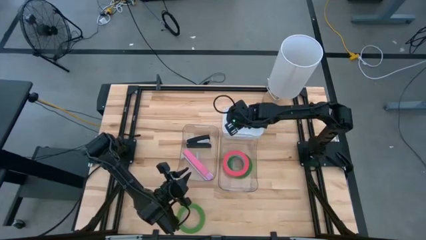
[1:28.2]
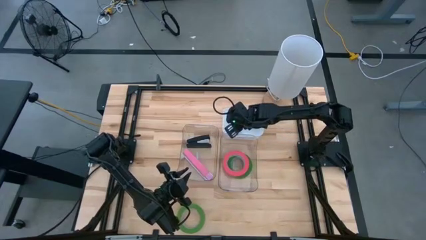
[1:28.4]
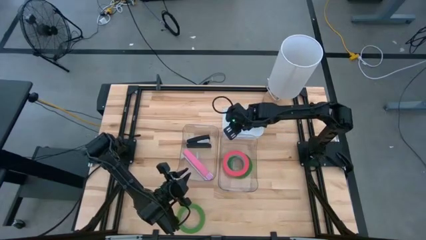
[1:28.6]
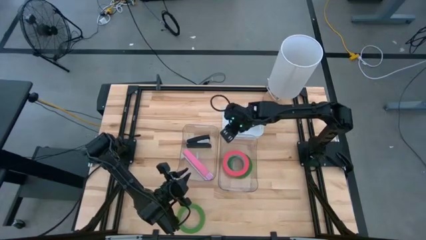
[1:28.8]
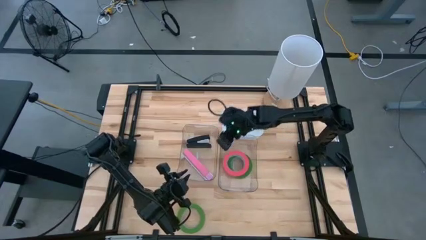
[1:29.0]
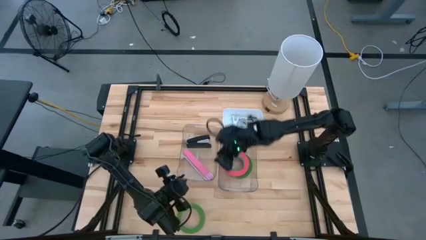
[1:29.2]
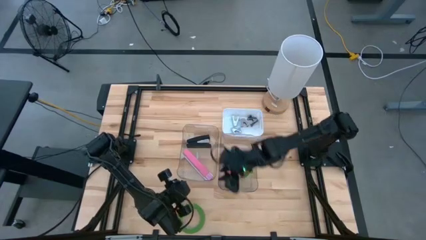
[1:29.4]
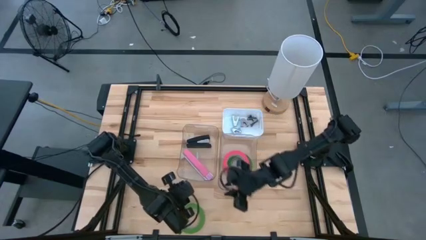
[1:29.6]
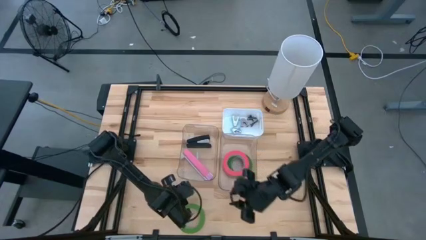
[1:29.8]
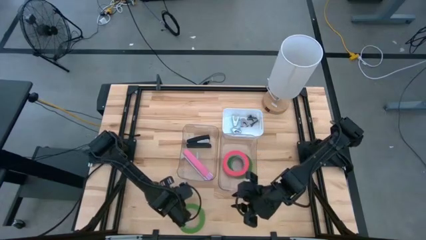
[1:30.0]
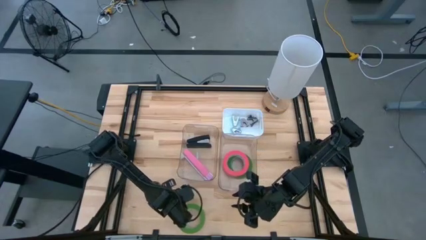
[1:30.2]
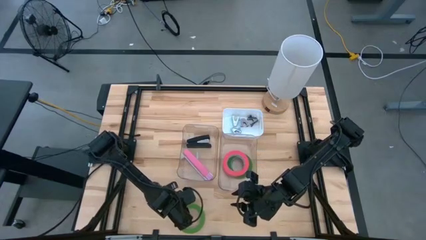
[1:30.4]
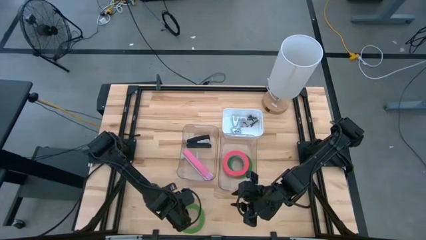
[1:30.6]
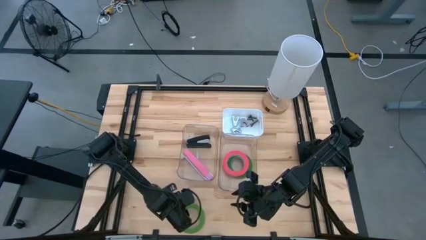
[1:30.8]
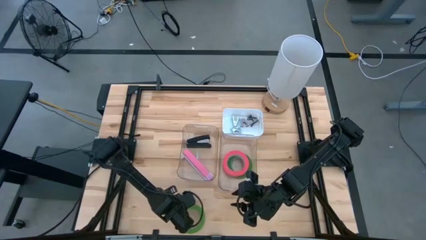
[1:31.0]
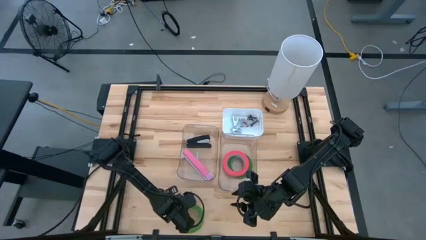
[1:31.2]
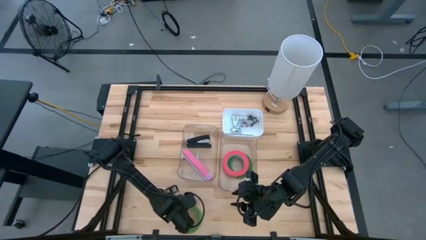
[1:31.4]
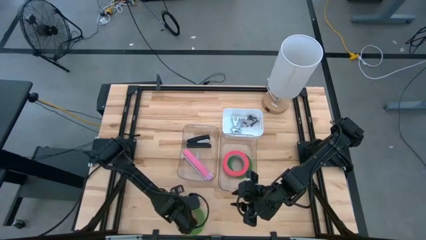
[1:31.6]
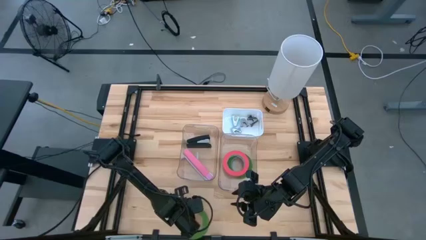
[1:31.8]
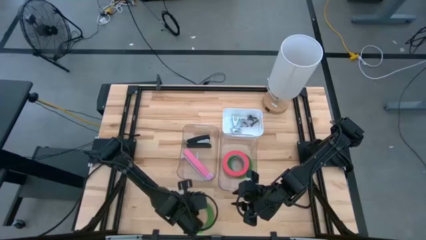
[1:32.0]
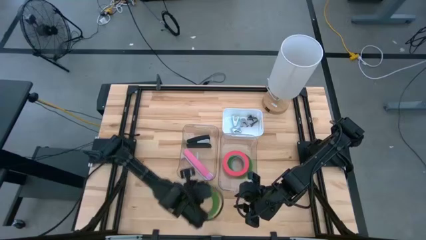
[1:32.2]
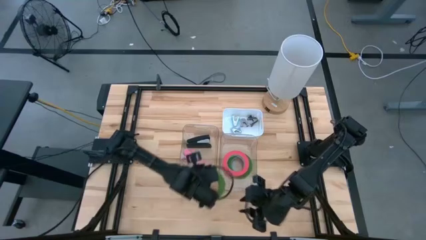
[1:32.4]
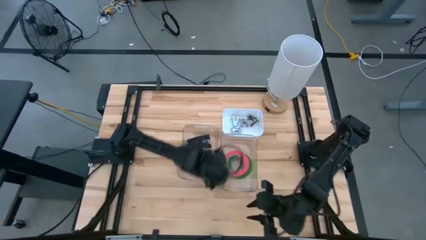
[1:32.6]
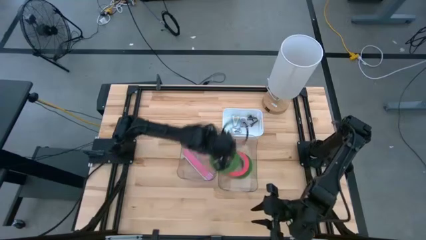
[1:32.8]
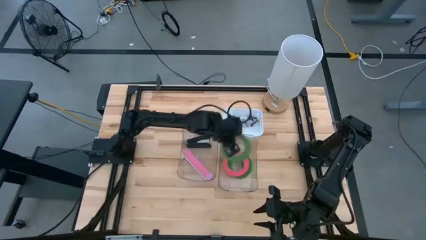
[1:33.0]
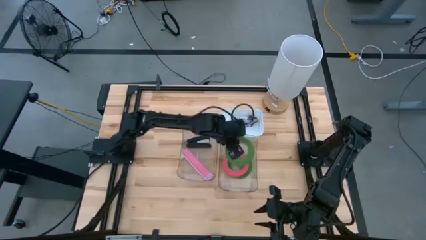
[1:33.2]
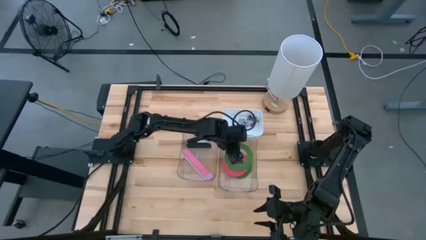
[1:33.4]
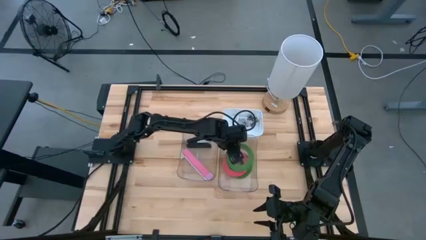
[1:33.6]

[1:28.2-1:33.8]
Task: Pick and place Stapler, Stapler remover, tape
Put the green tape into the right transparent bin

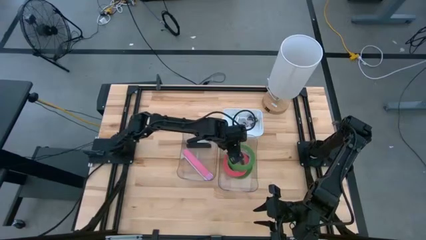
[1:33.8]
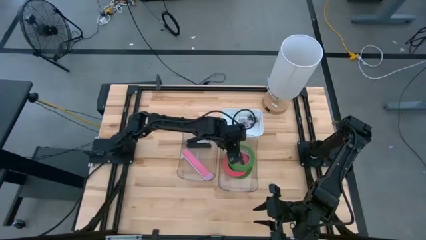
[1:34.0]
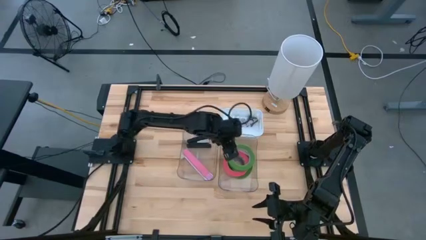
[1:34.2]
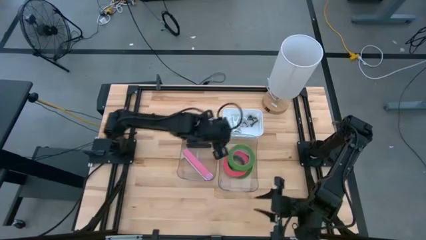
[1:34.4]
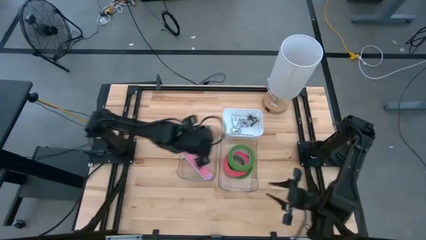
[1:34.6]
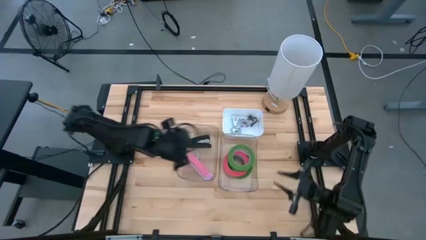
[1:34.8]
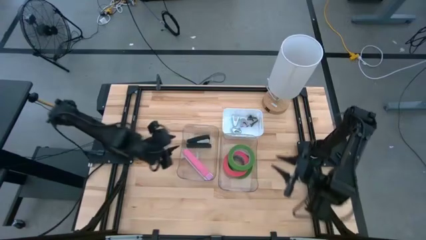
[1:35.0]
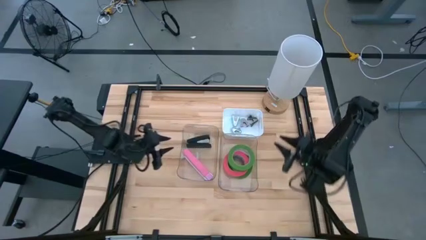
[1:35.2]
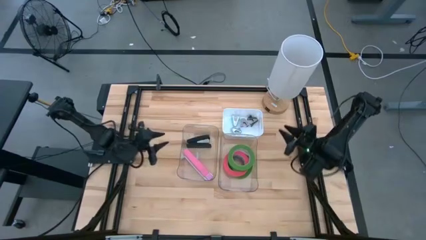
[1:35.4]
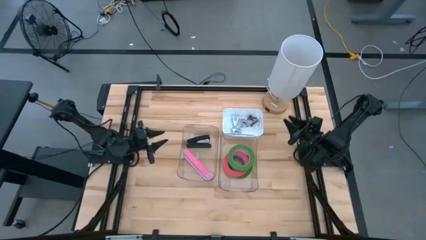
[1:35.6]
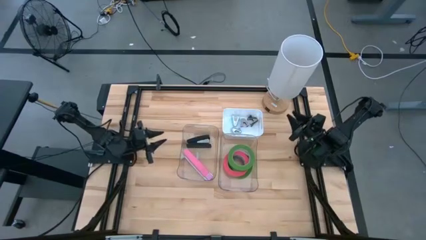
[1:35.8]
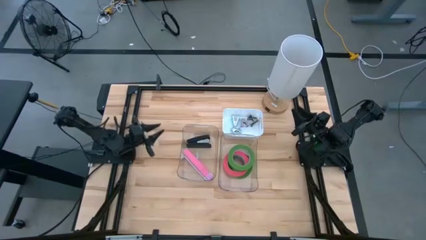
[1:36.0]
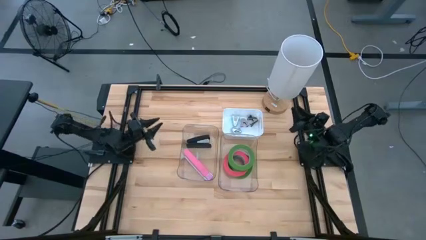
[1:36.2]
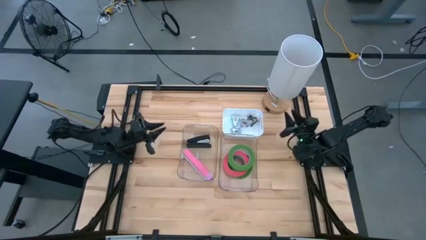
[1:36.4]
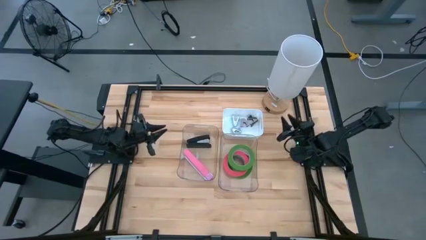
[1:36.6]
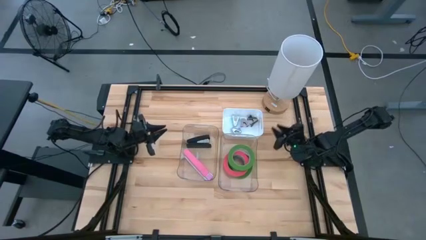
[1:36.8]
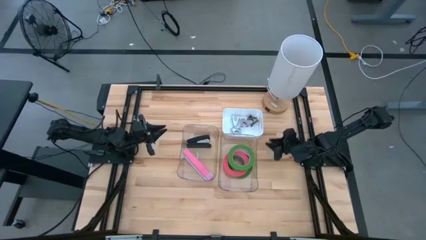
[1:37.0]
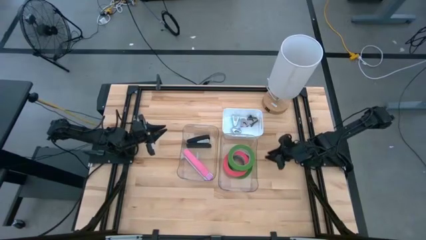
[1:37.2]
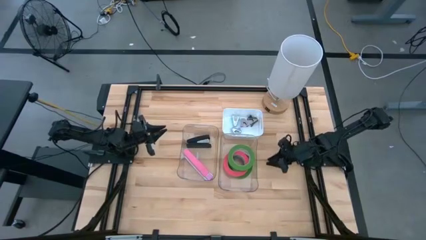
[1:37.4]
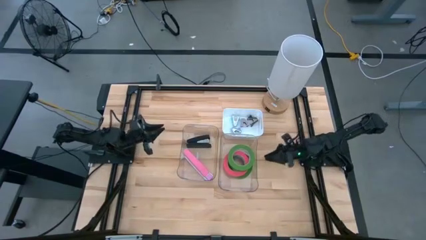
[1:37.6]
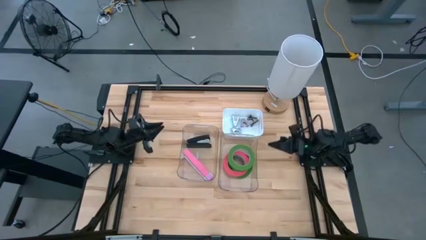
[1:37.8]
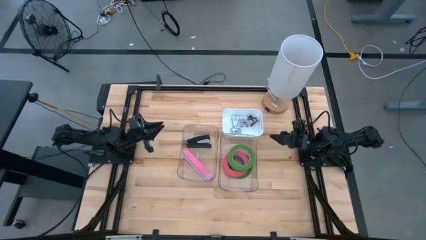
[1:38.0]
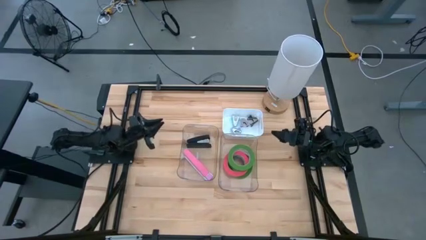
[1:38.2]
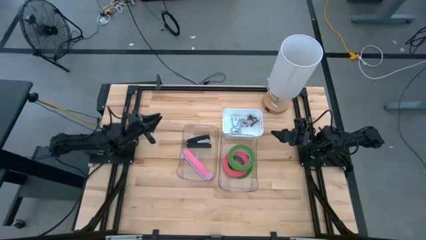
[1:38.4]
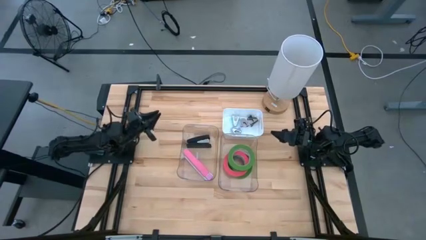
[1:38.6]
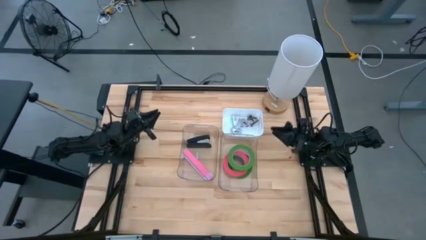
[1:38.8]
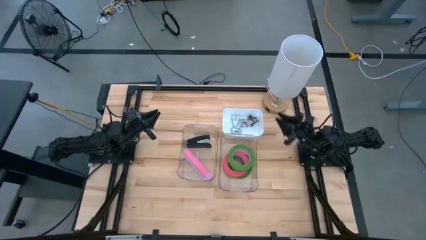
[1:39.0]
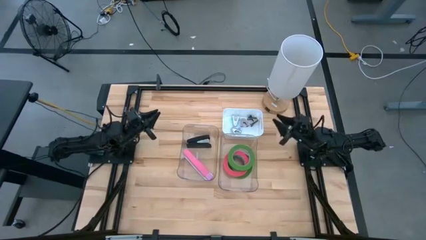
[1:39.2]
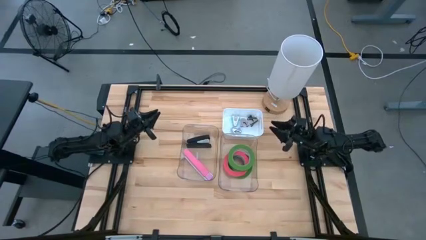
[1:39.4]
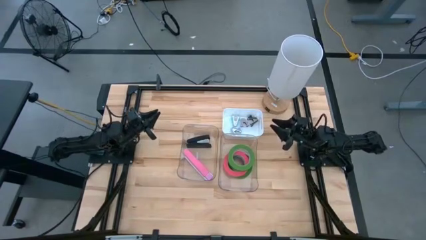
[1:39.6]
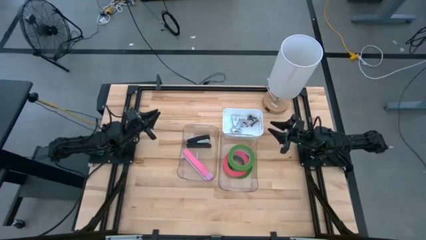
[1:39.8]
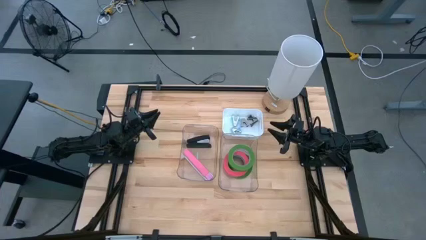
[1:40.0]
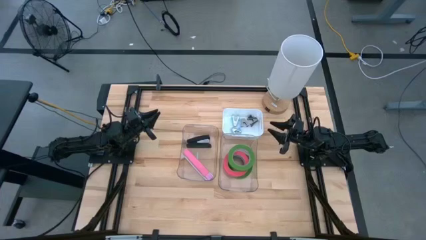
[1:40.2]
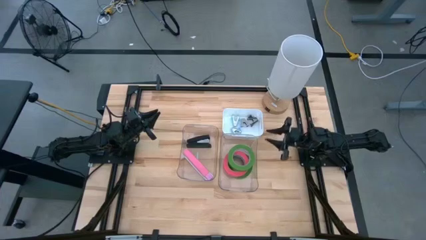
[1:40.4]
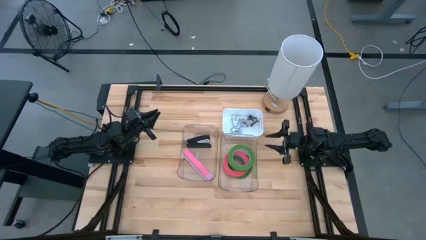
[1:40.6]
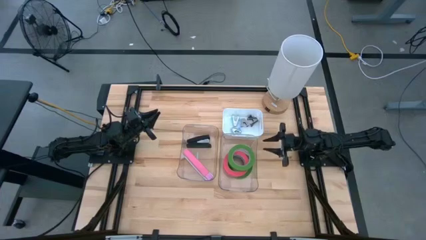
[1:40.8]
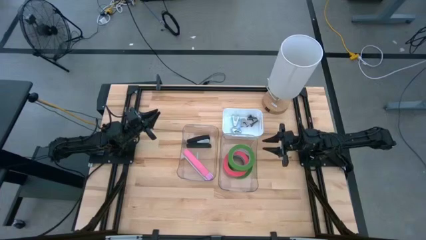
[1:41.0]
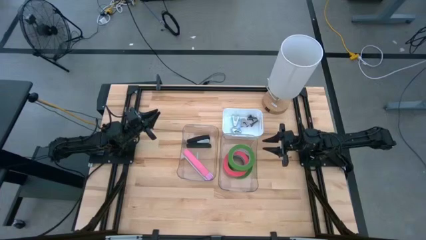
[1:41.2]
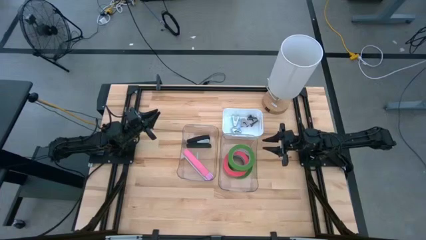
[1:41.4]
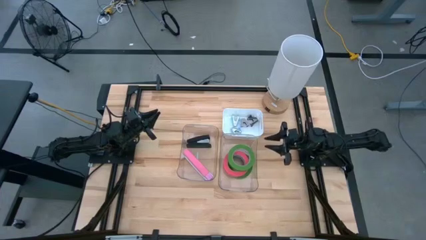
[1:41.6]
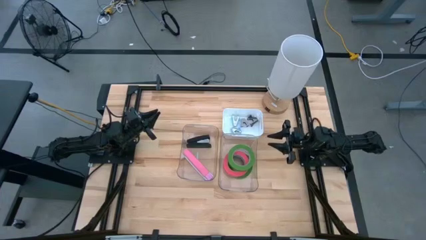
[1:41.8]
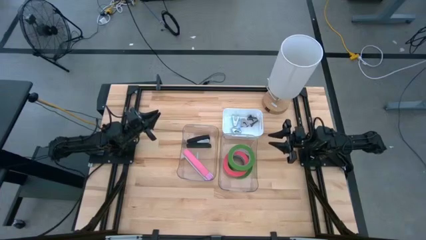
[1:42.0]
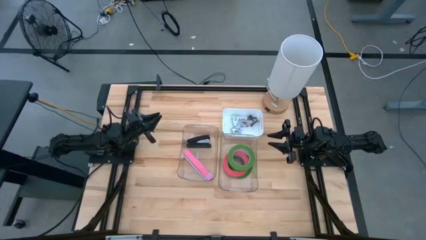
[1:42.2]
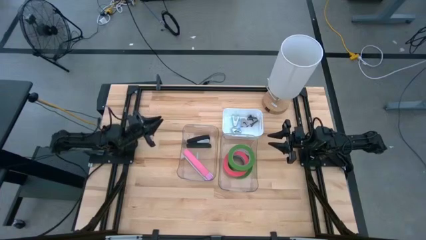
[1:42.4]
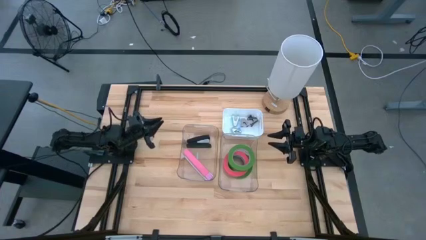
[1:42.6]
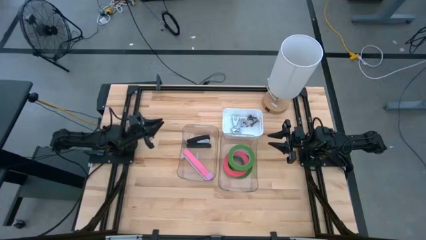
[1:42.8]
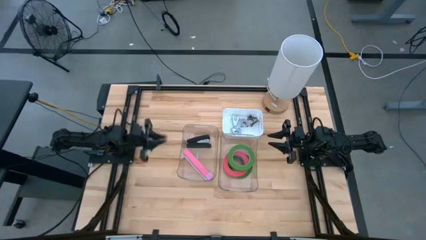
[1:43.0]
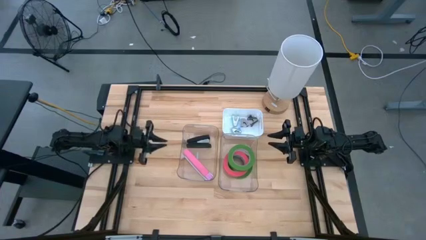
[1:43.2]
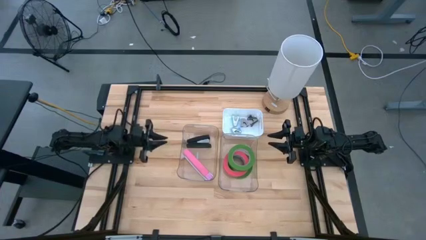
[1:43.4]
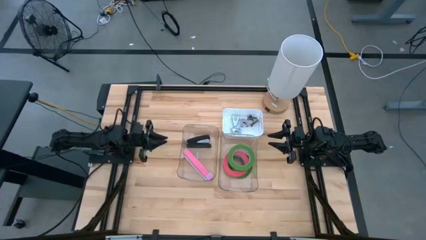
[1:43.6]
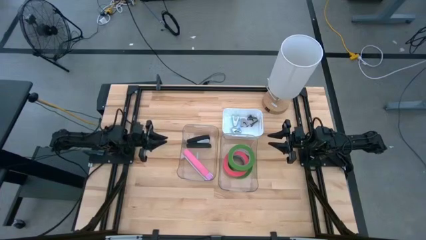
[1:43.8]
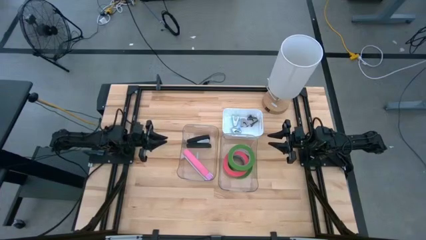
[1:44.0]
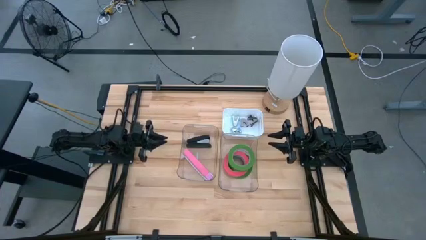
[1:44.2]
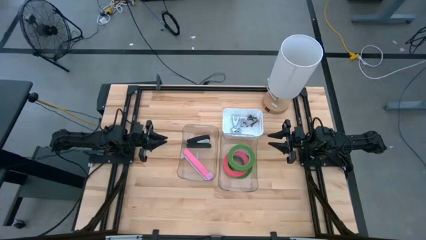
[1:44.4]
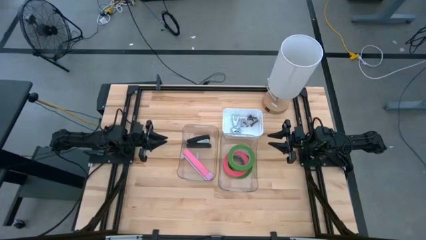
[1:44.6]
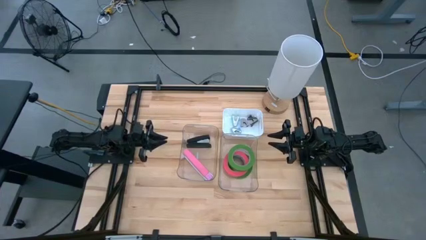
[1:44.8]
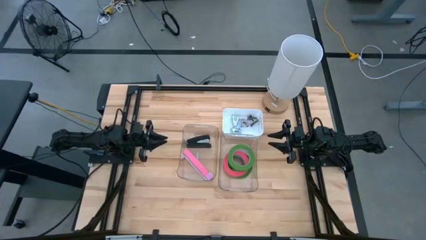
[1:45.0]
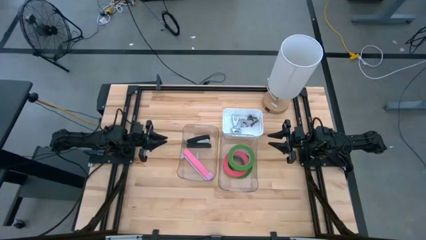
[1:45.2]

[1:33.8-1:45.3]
Return to Home Position
